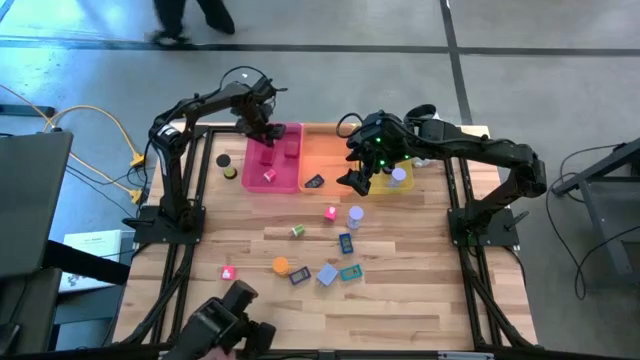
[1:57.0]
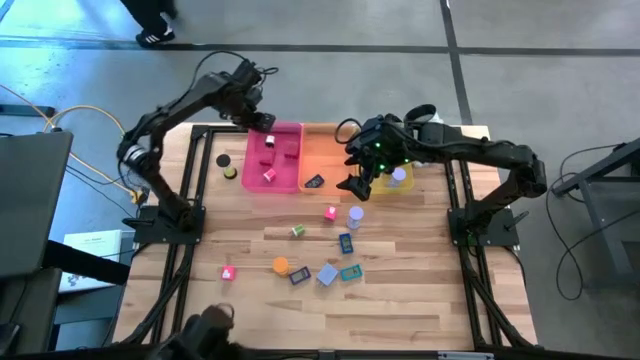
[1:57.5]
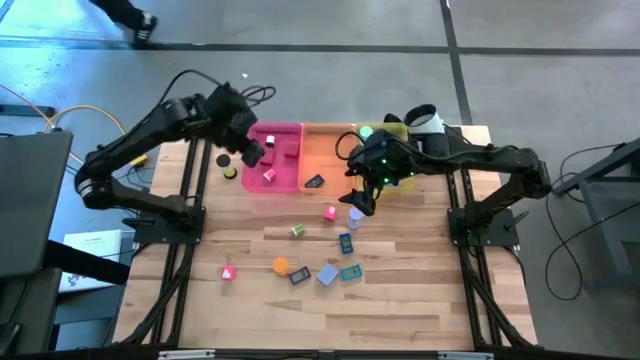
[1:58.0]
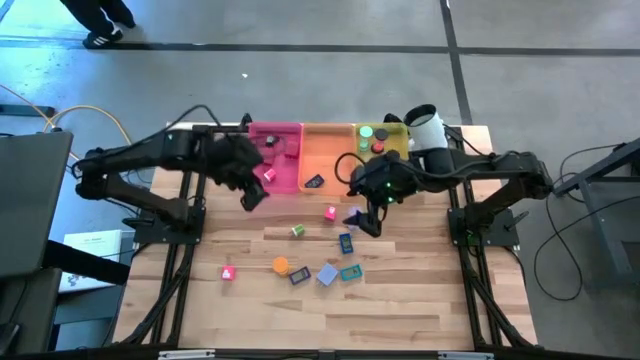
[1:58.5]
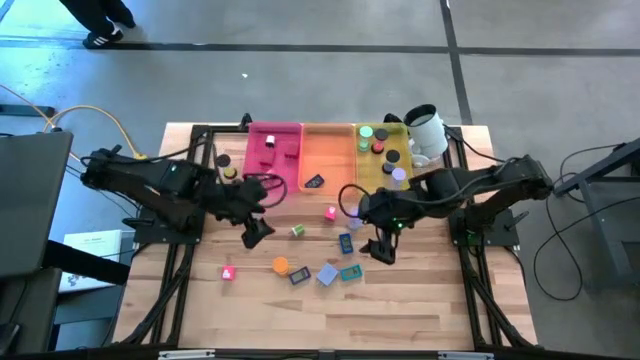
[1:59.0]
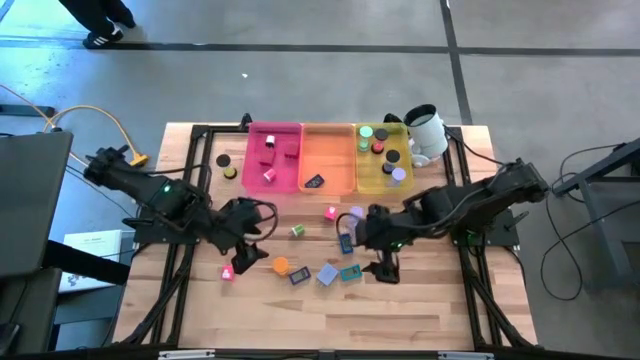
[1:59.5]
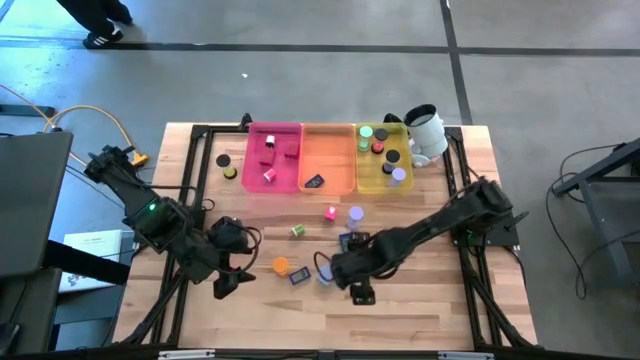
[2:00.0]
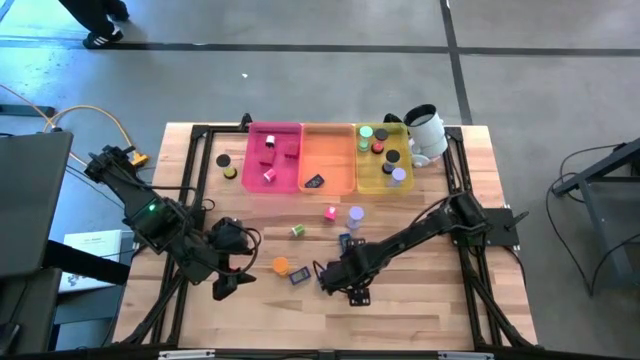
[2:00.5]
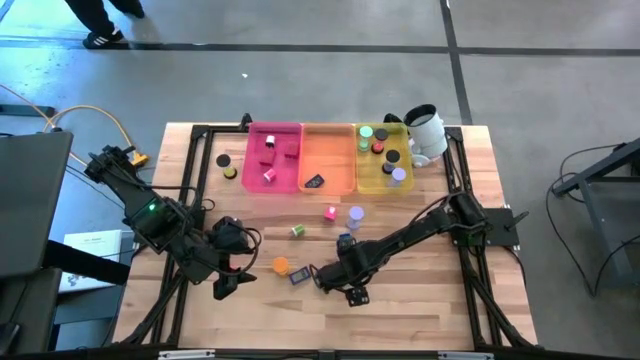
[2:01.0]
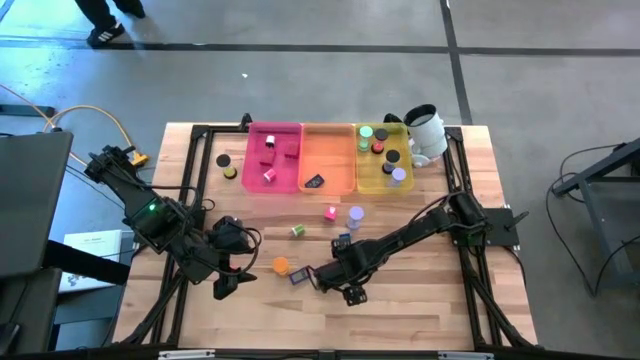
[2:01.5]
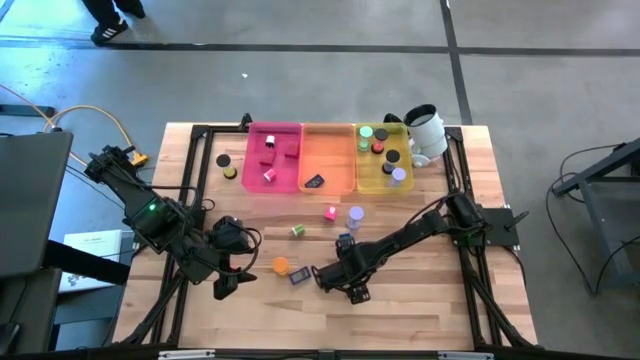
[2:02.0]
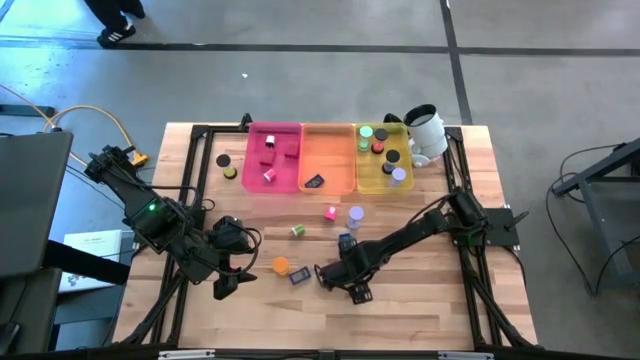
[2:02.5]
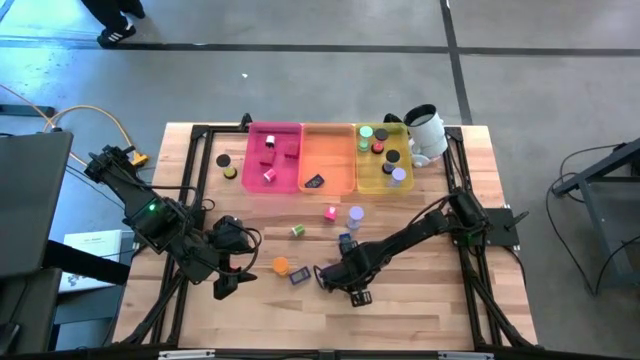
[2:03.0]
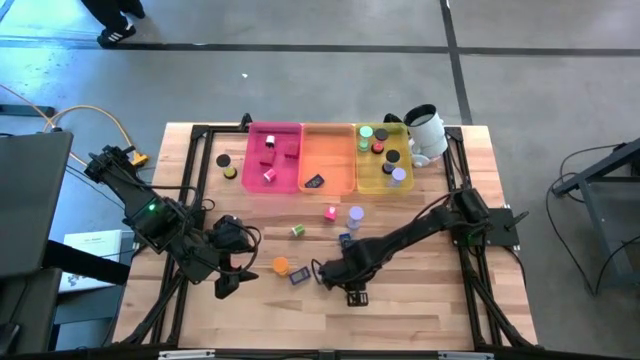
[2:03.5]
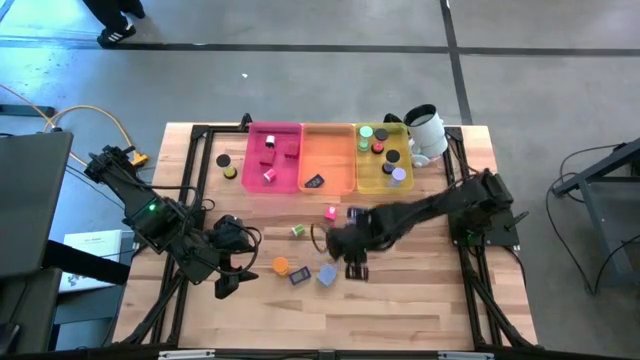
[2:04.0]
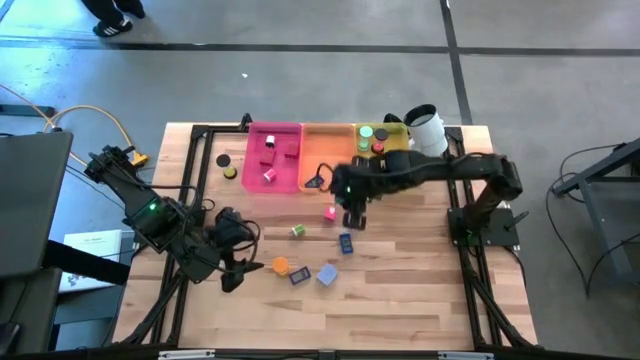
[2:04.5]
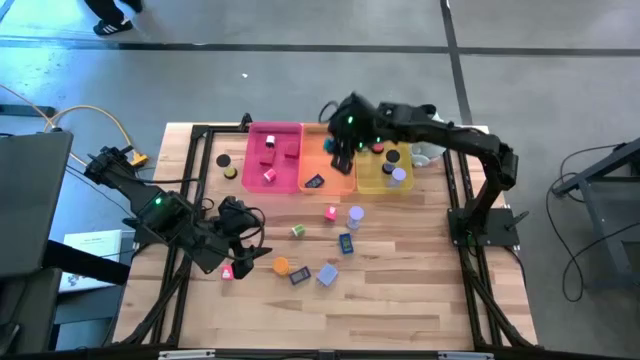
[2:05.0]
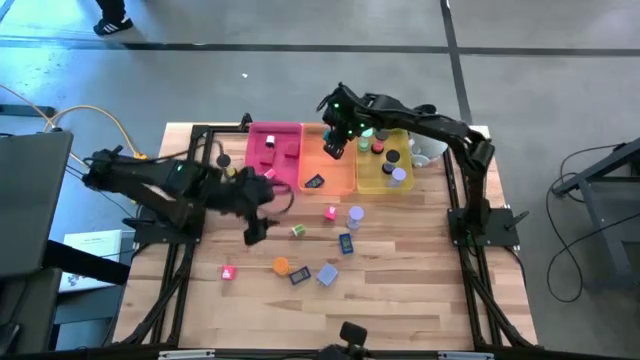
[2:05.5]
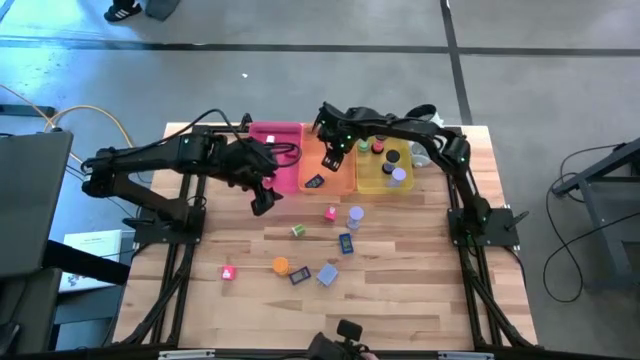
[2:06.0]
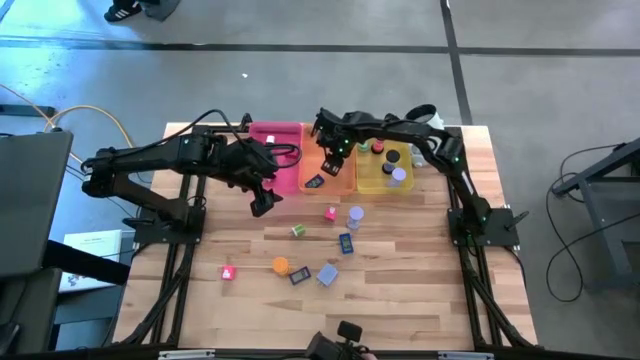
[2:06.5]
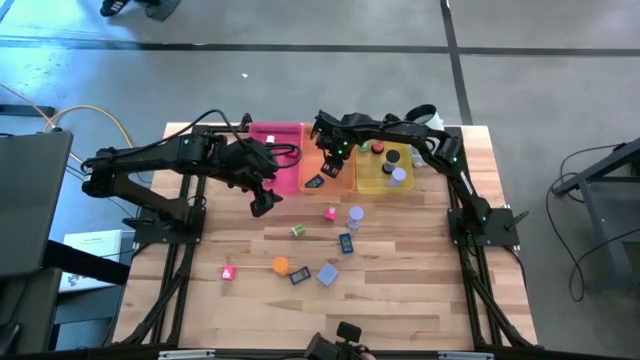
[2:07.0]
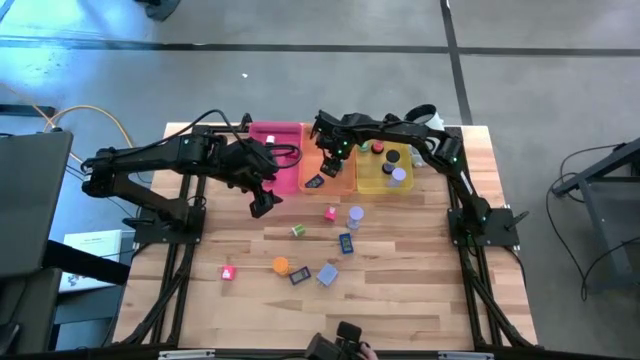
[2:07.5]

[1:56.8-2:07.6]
Task: Pick & Place Office items
Put the light blue digital clock into the orange bin

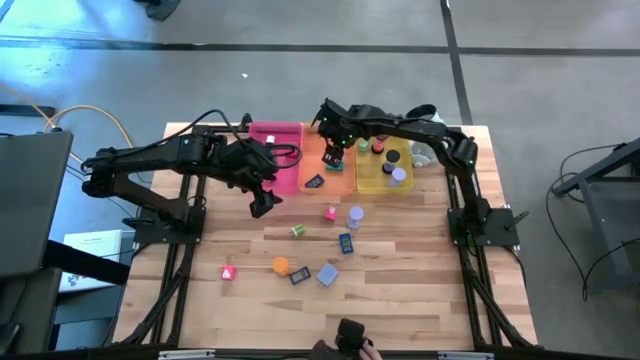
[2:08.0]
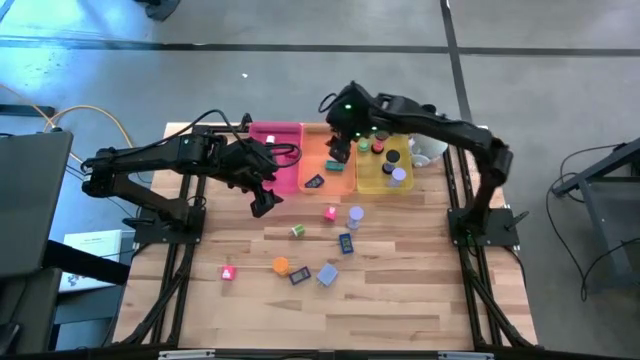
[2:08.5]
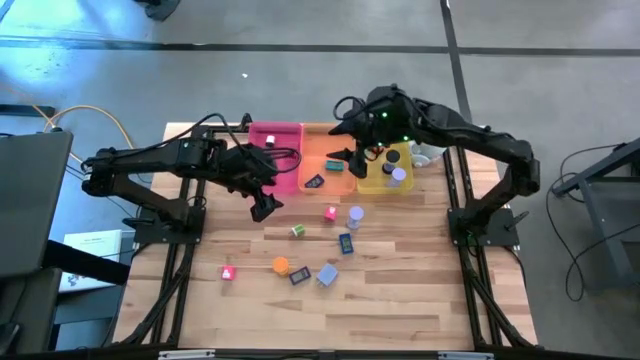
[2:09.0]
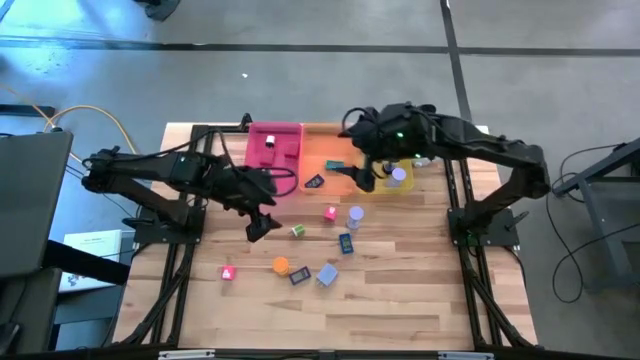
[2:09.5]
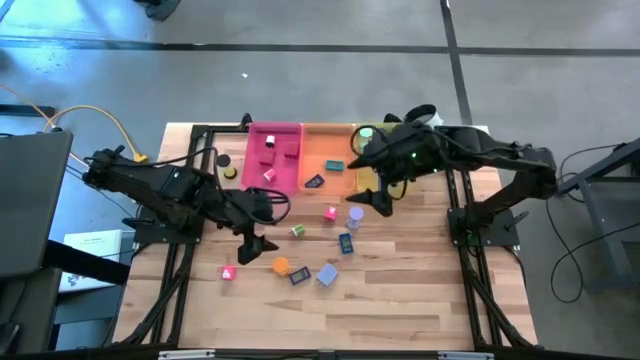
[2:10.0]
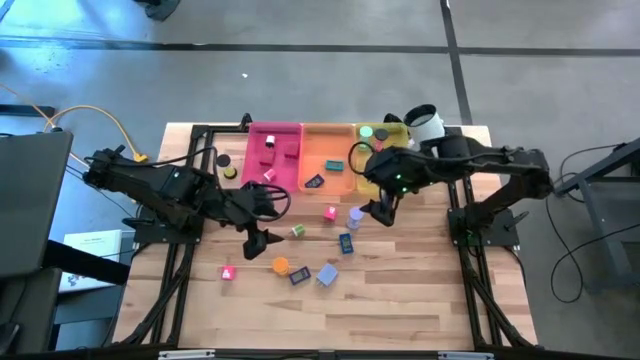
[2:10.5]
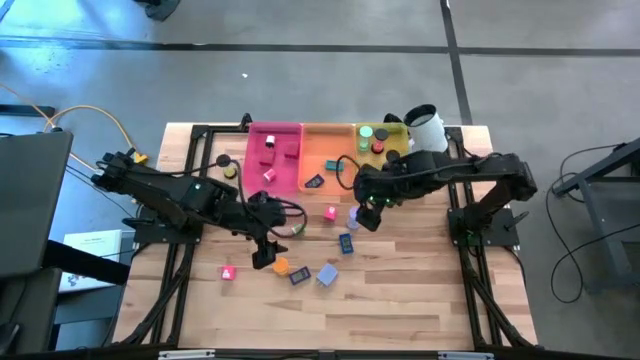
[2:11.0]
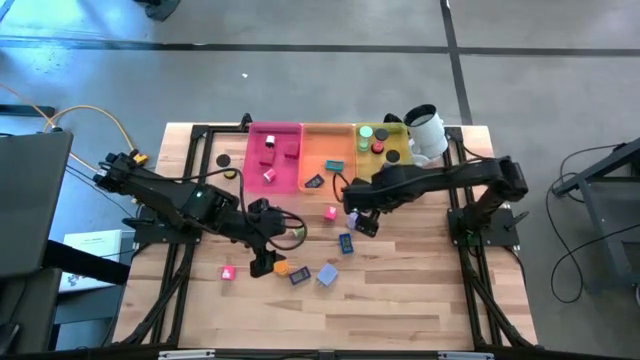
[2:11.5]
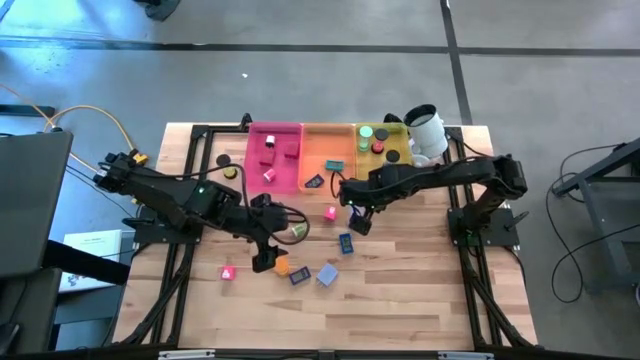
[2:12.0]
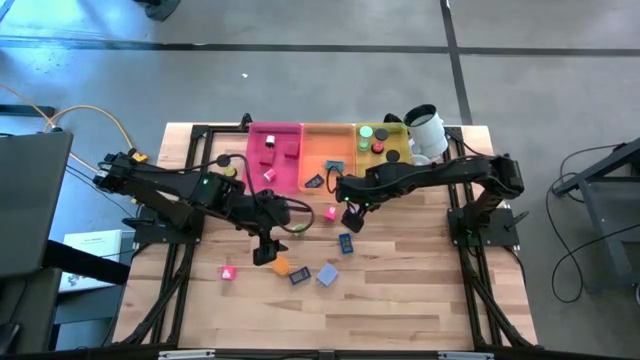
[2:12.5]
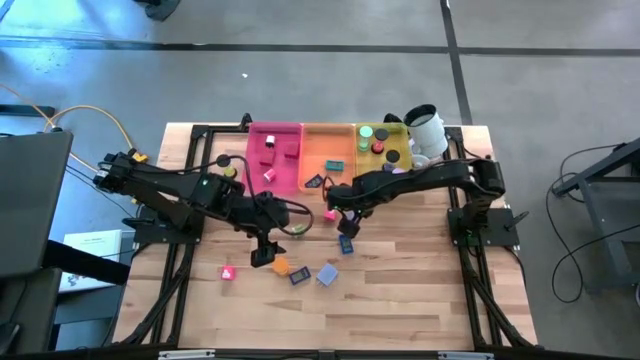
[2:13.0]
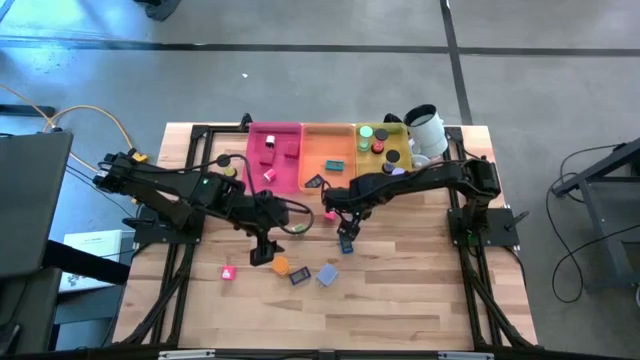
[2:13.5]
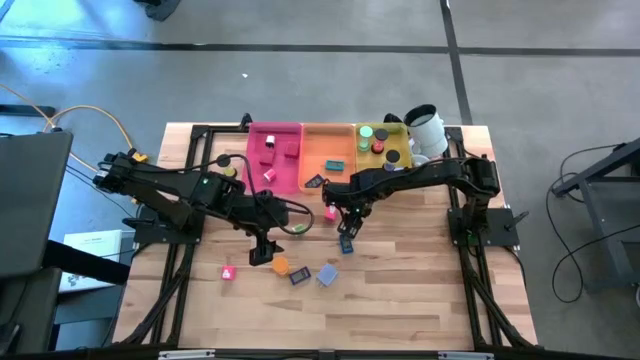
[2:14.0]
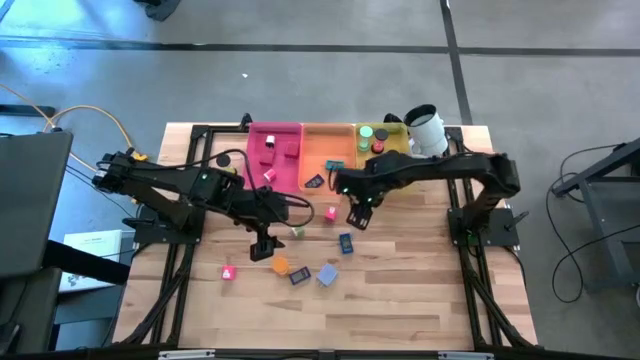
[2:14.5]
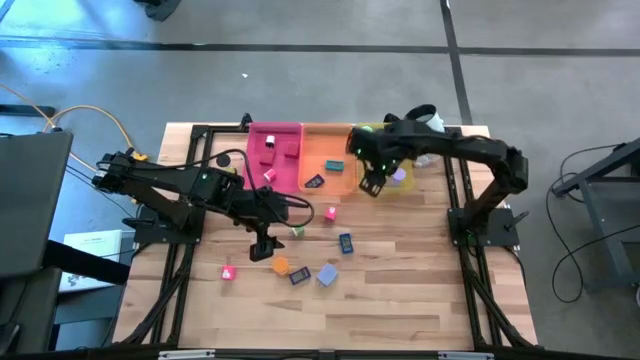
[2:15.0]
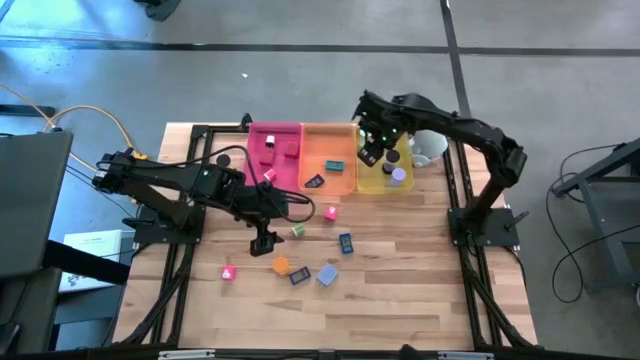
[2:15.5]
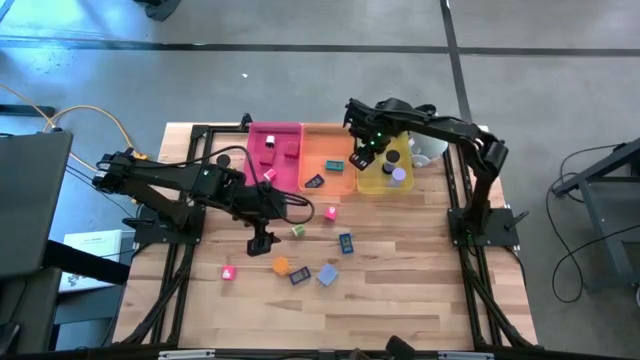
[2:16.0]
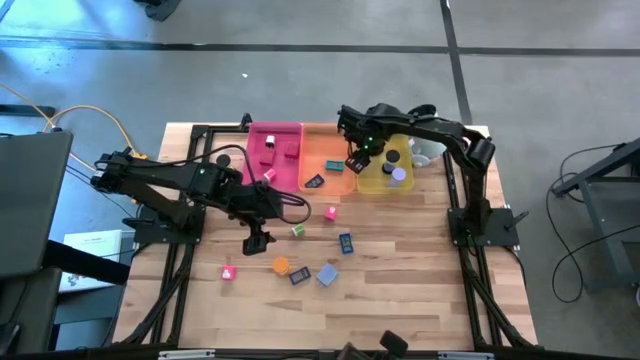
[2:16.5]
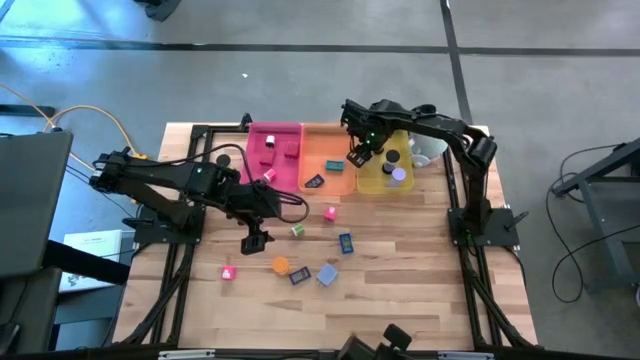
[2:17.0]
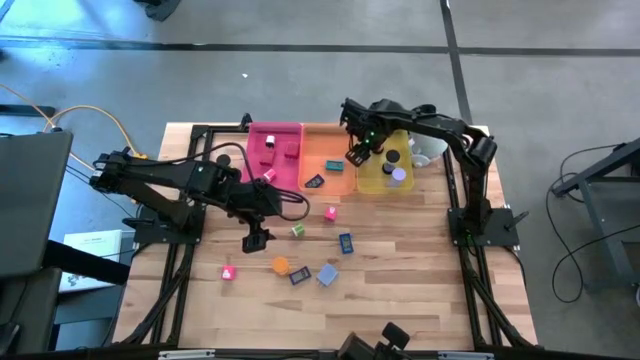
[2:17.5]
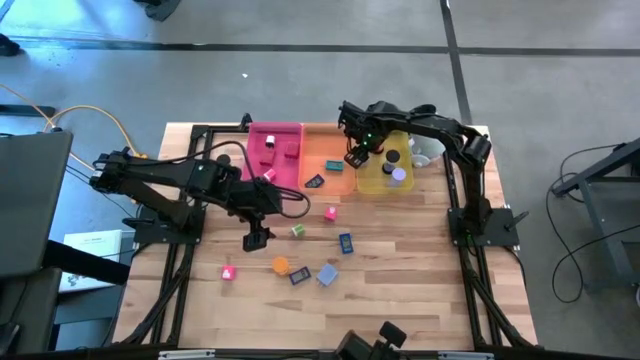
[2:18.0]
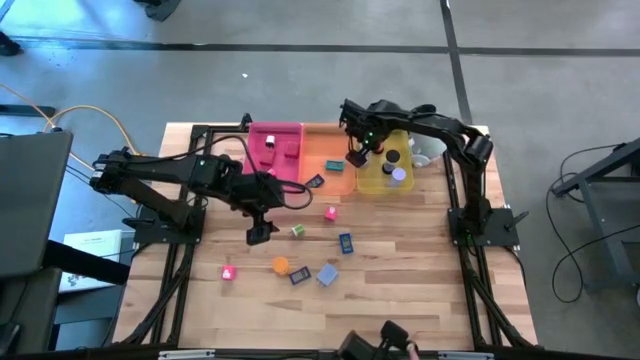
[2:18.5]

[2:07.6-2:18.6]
Put the violet hourglass into the yellow bin

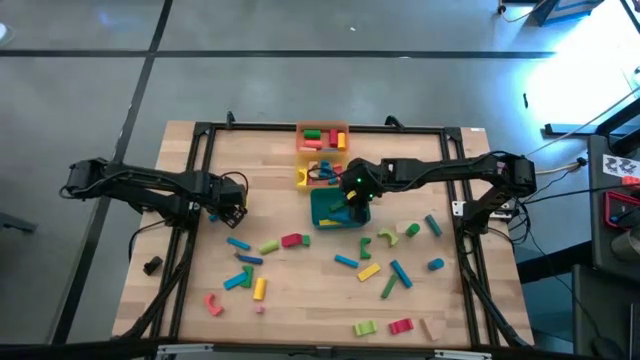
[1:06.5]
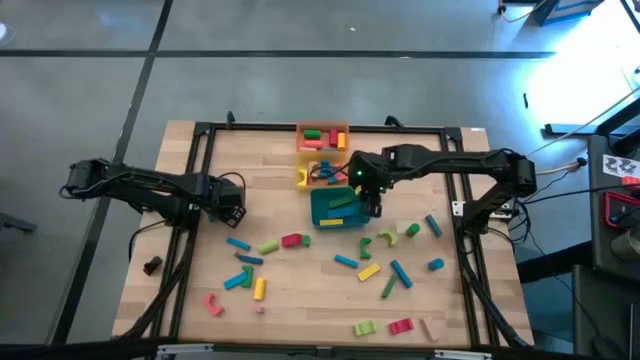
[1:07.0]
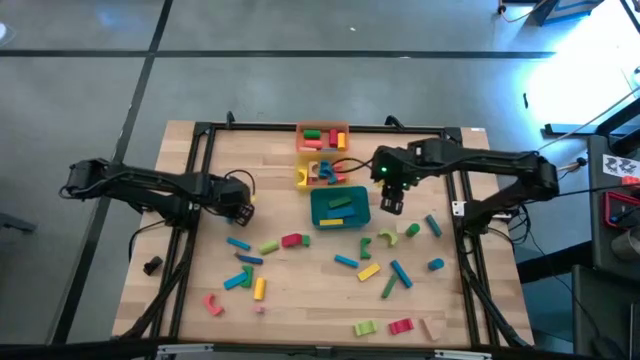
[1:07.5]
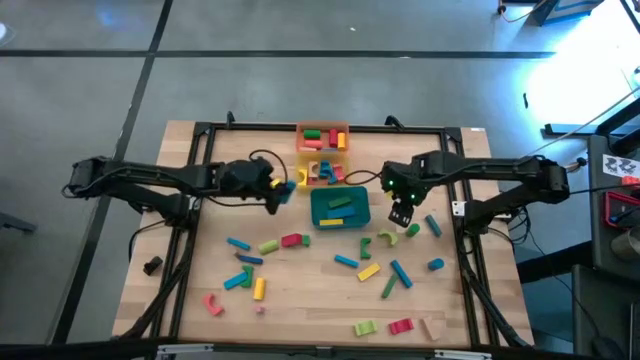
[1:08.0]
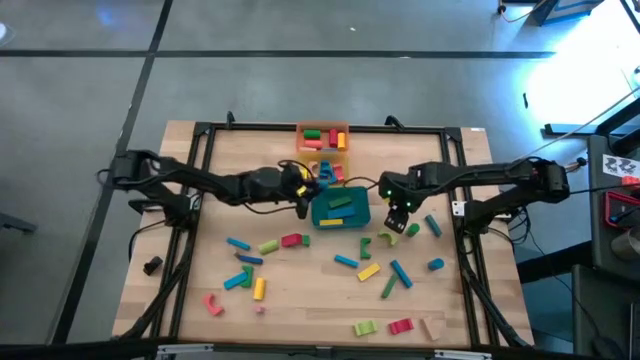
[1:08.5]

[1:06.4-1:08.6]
Task: Sort blocks by size
Put the blue rectangular block into the blue bin
